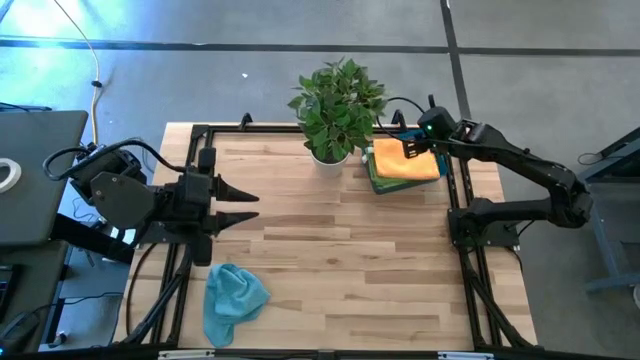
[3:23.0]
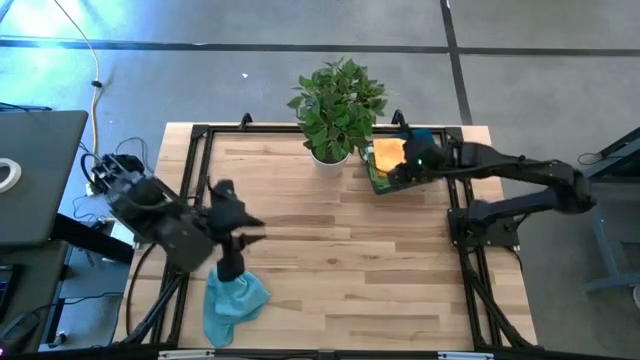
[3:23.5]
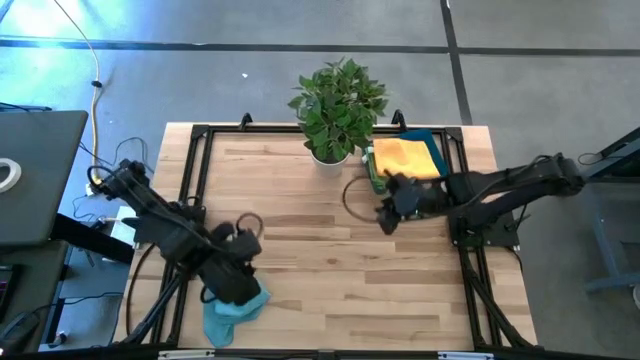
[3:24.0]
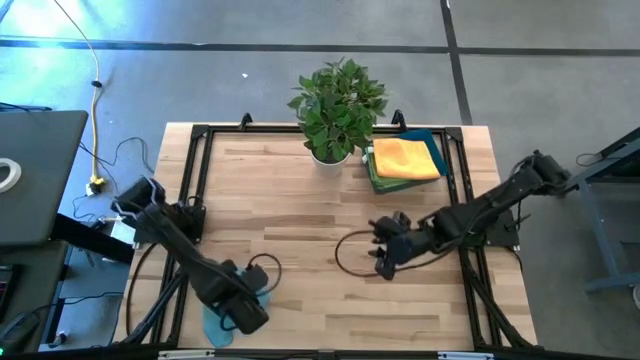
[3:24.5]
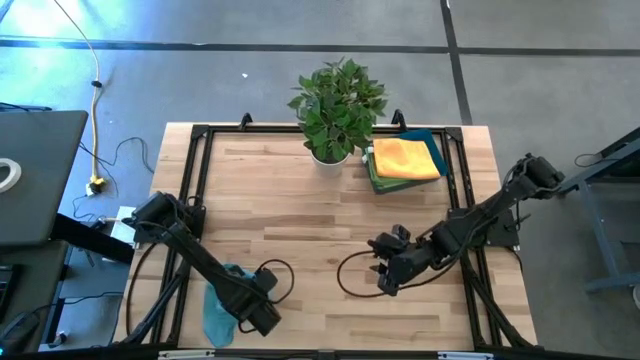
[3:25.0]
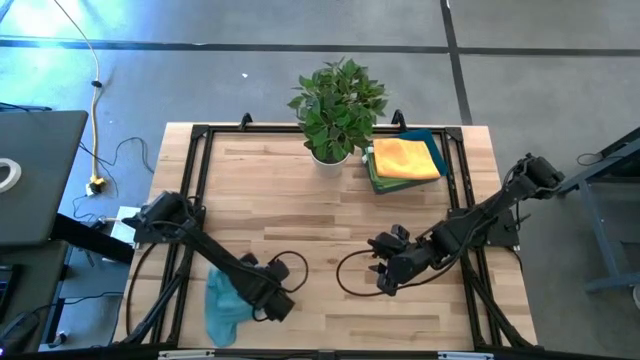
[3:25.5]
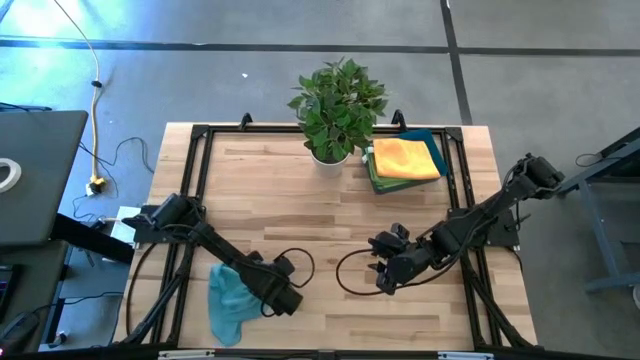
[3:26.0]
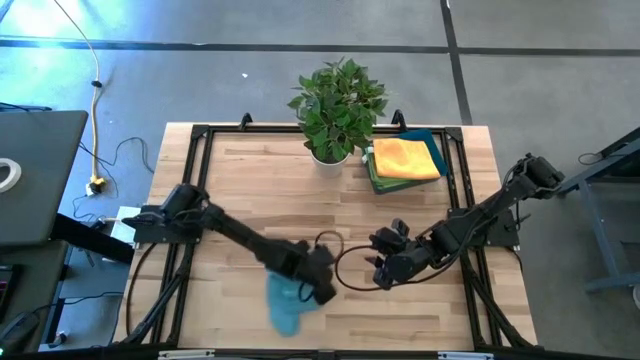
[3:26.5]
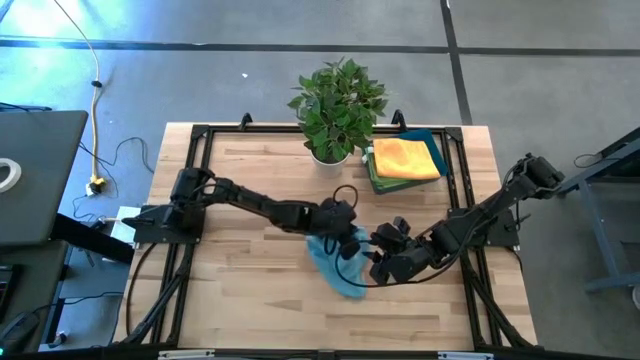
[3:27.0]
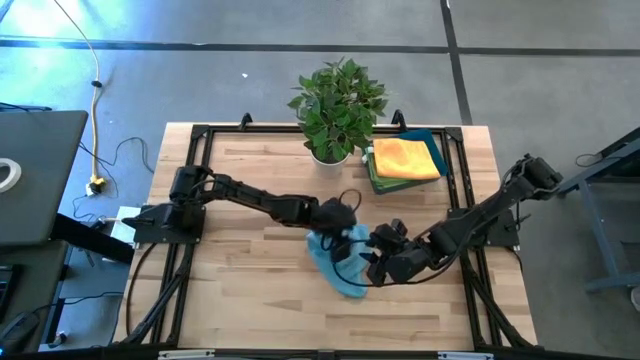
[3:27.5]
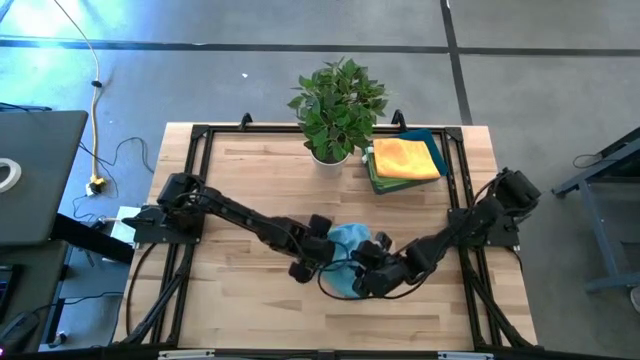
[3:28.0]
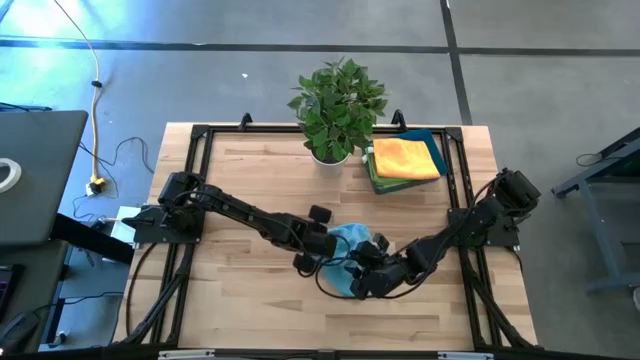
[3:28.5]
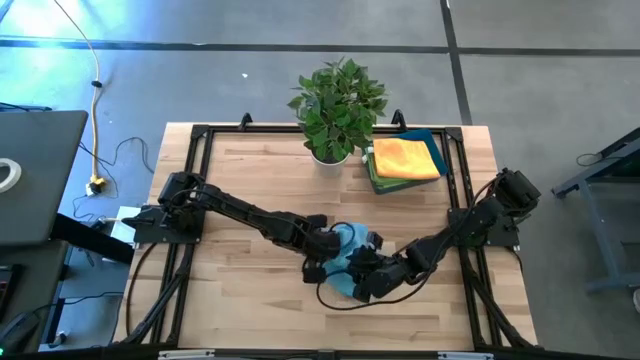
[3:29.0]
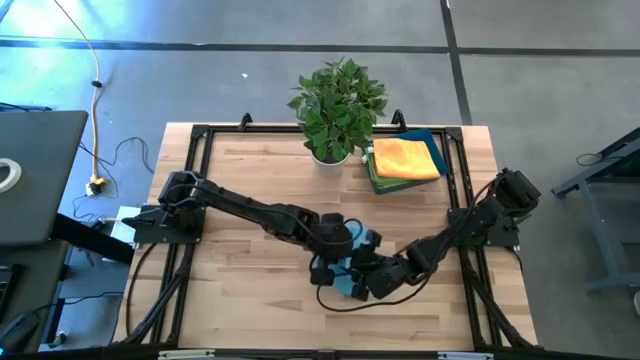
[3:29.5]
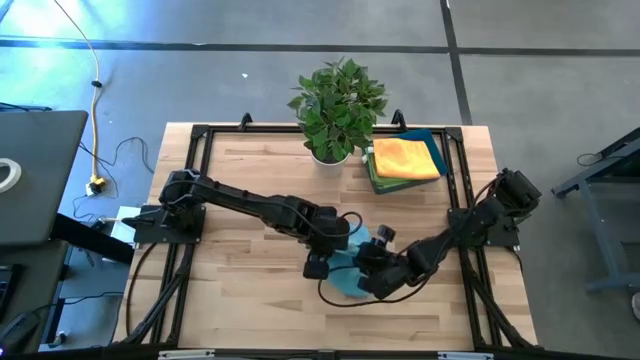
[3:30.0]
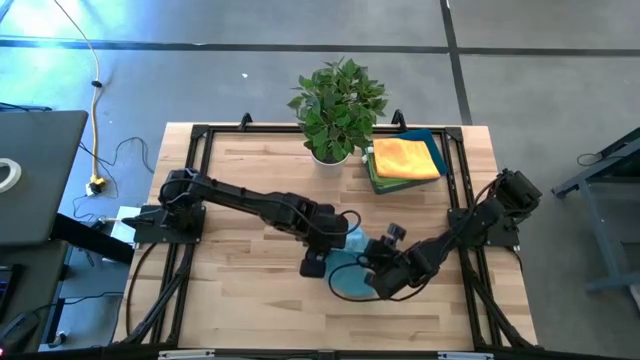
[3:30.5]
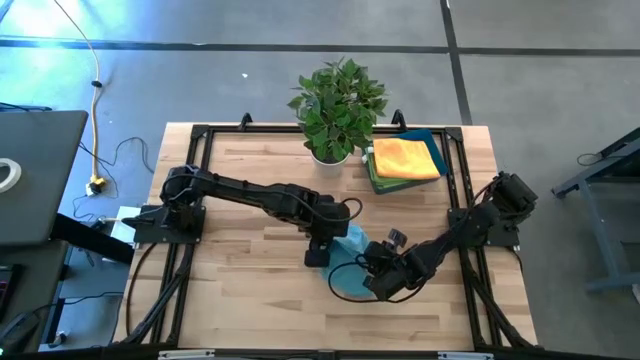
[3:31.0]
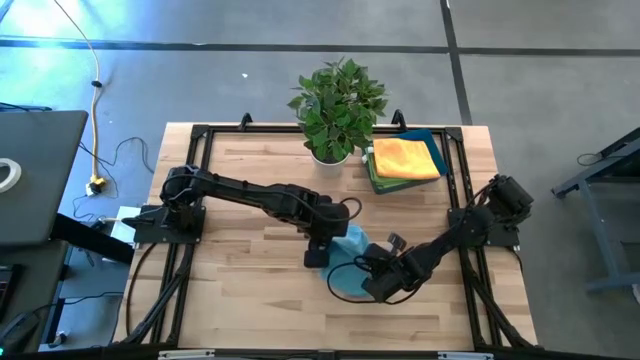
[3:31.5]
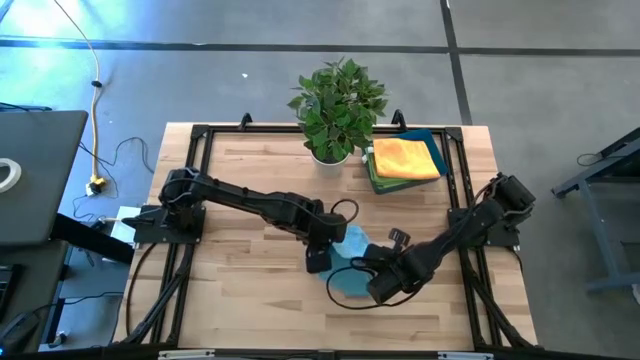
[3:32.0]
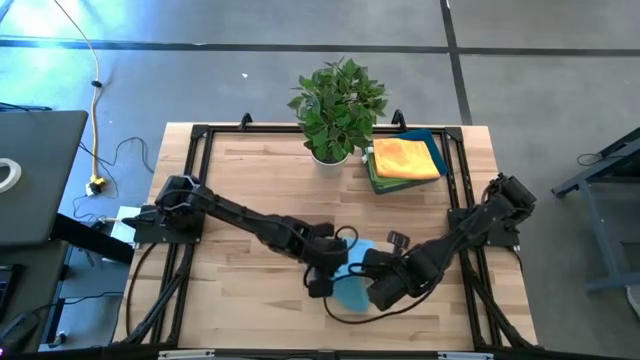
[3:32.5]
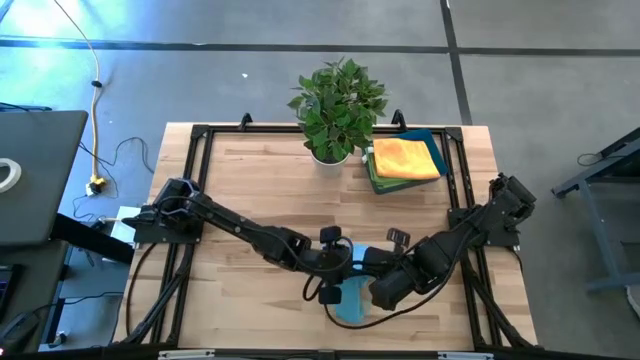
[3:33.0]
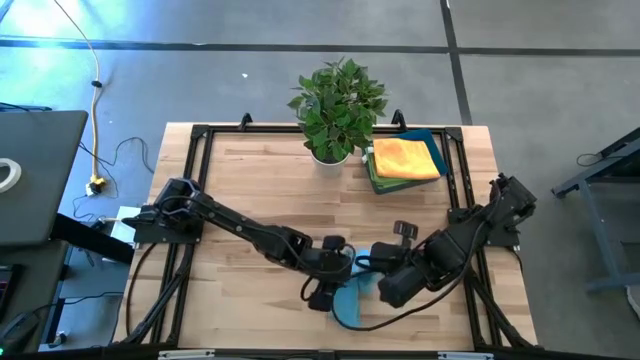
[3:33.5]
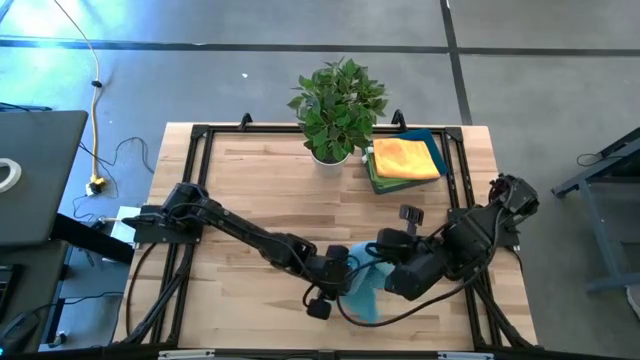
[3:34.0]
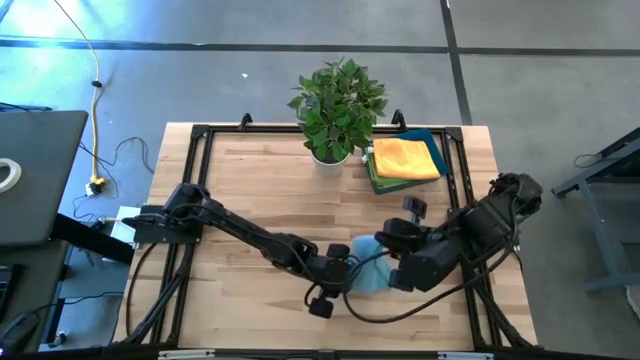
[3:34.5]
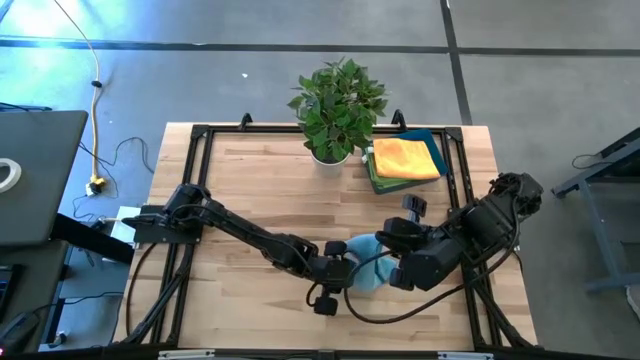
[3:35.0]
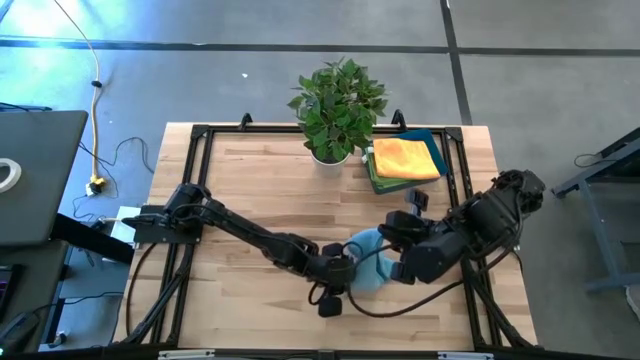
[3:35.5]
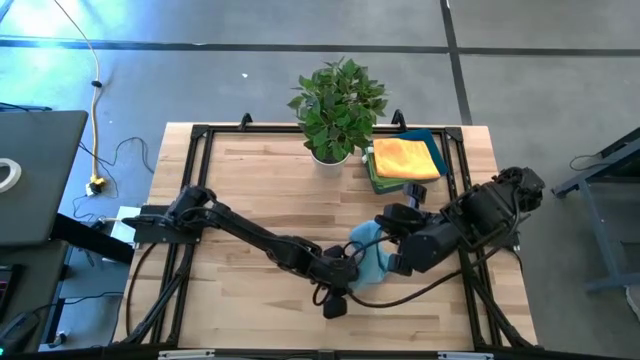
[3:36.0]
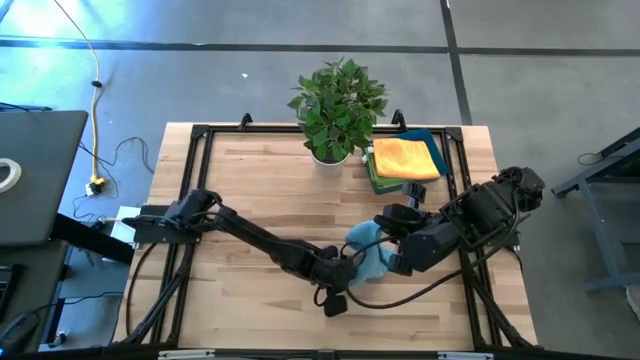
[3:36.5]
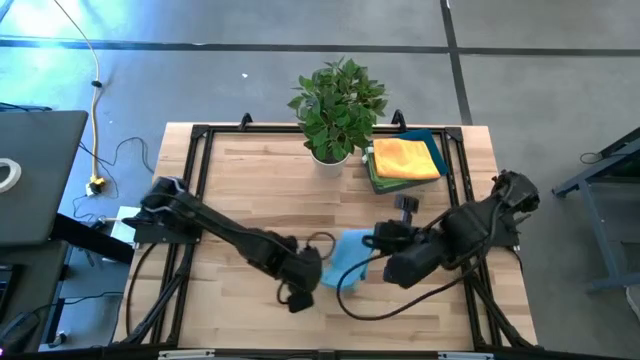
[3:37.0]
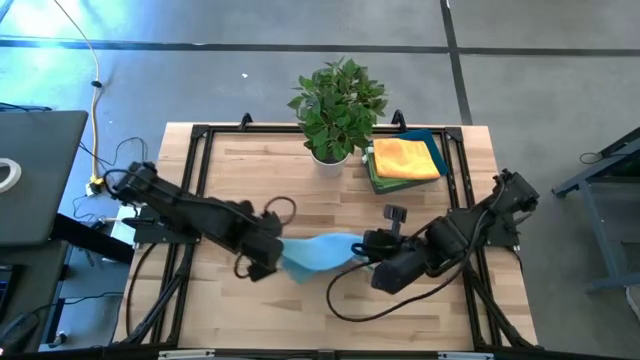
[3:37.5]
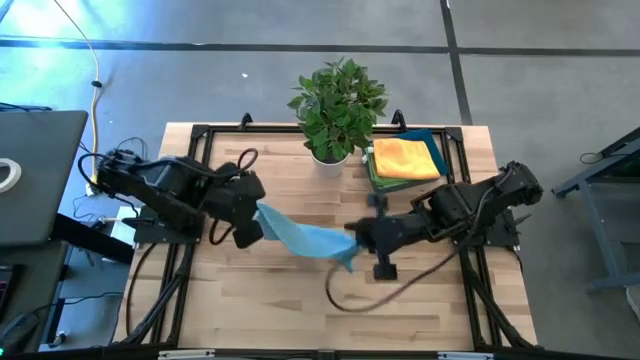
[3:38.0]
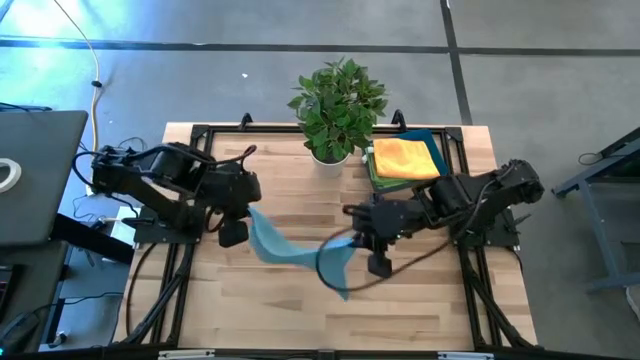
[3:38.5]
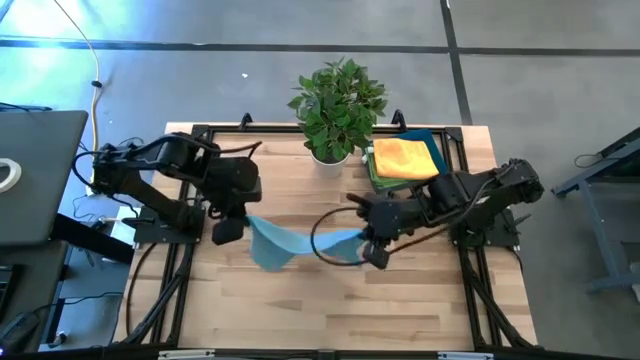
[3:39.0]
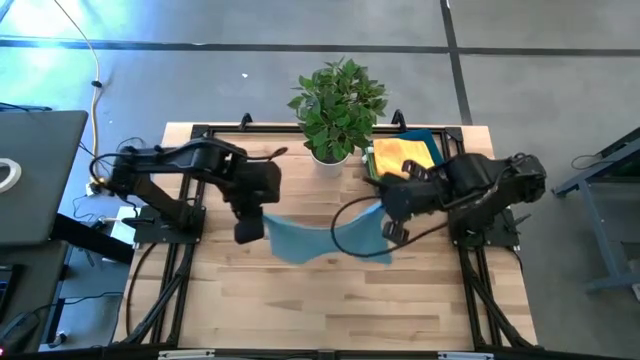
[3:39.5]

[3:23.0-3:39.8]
Task: Sort microfiber towel by color & place in baskets
Fold the blue towel

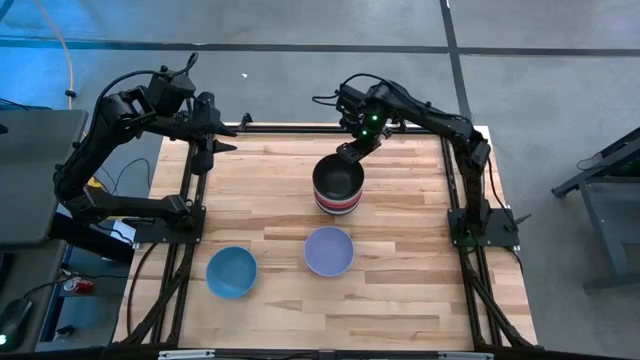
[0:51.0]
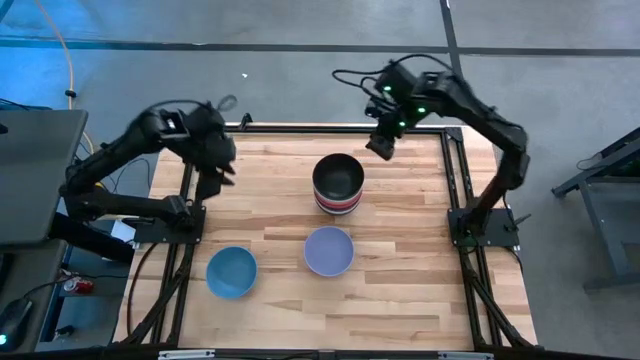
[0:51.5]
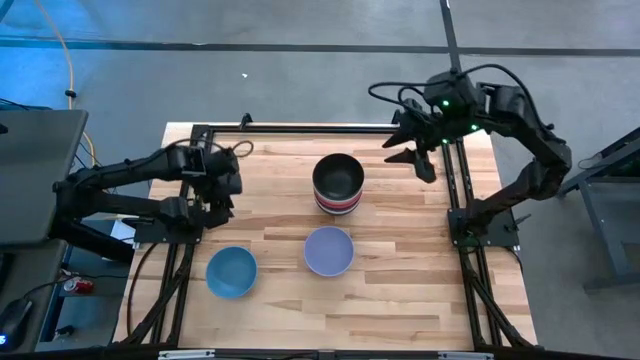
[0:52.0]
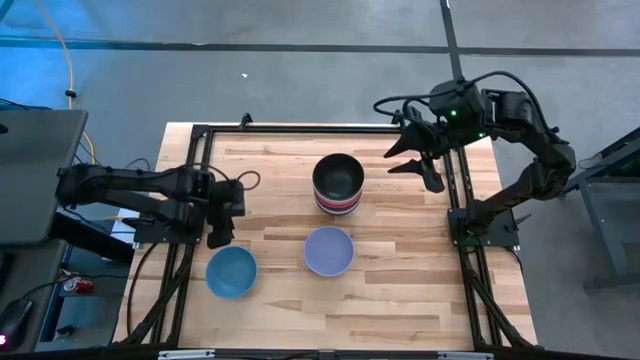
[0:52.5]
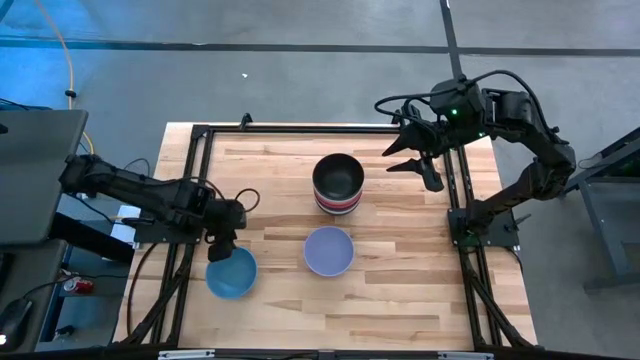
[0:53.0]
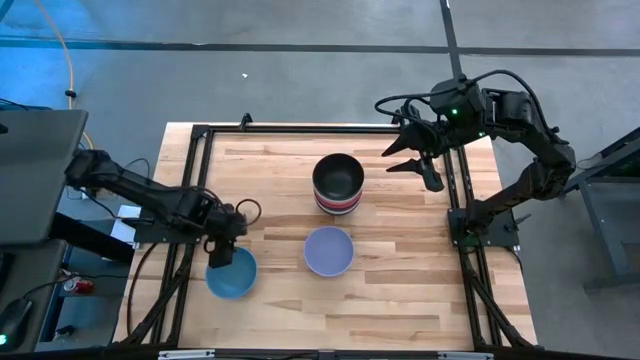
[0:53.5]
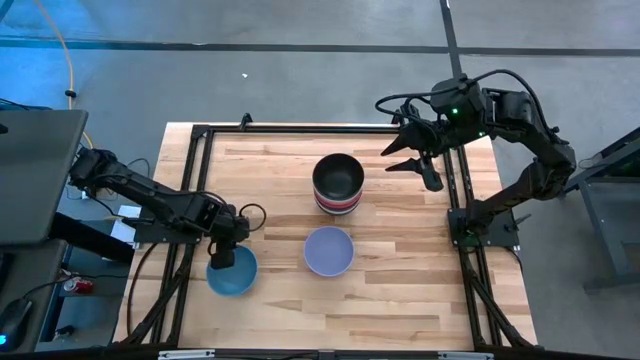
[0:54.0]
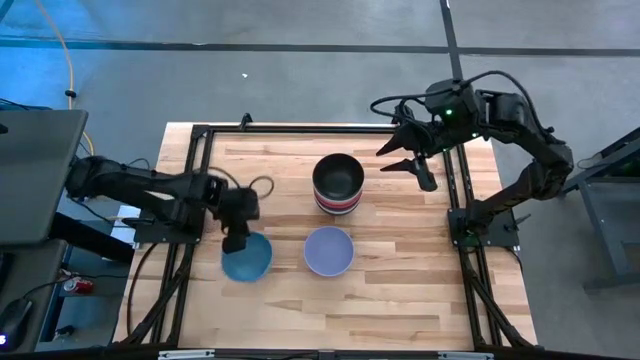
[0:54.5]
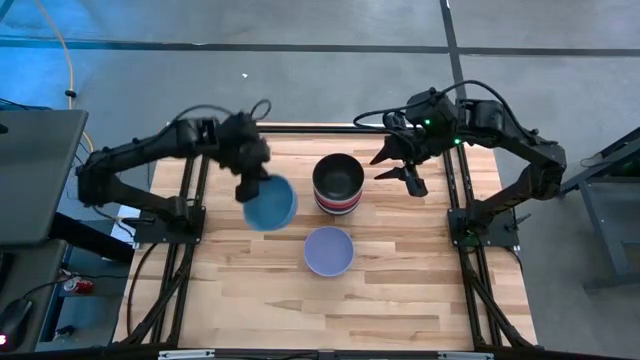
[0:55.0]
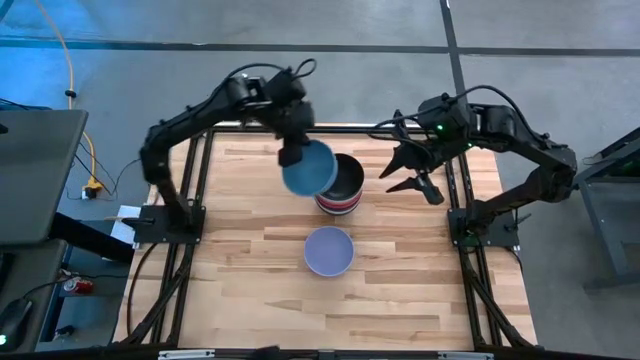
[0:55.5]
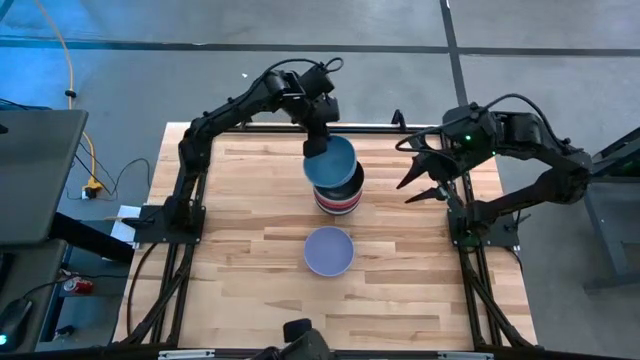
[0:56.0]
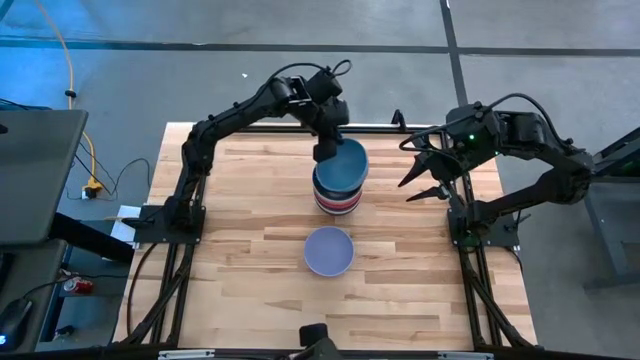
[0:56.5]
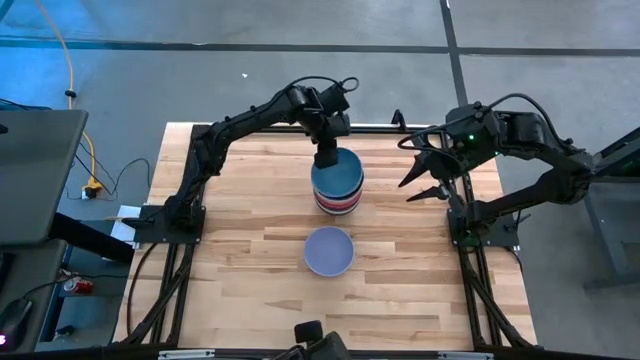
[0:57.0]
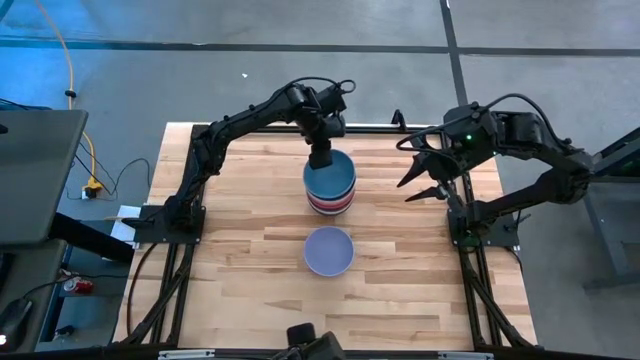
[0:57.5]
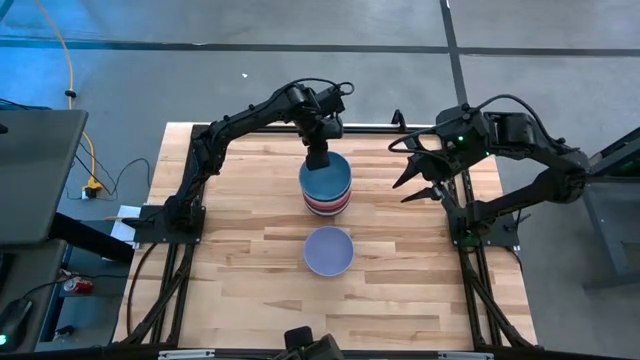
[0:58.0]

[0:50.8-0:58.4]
Task: Nest bowls inside each other
Stack the blue bowl on top of the black bowl
